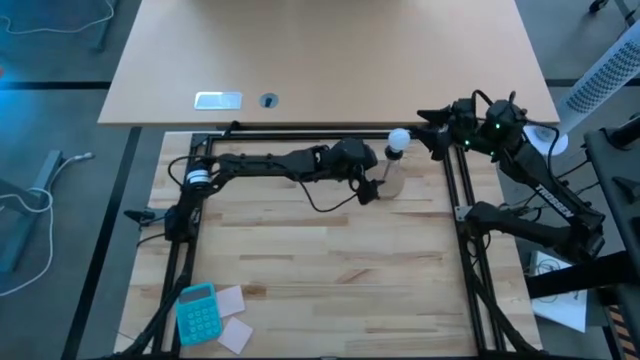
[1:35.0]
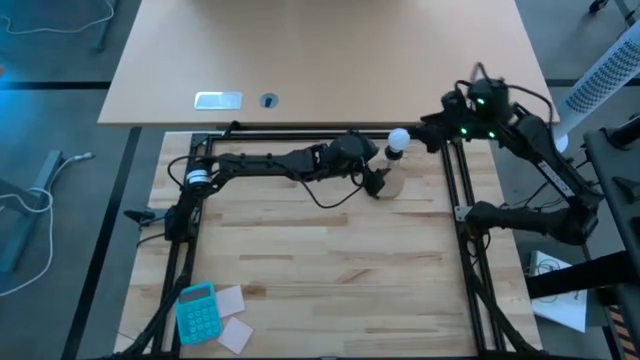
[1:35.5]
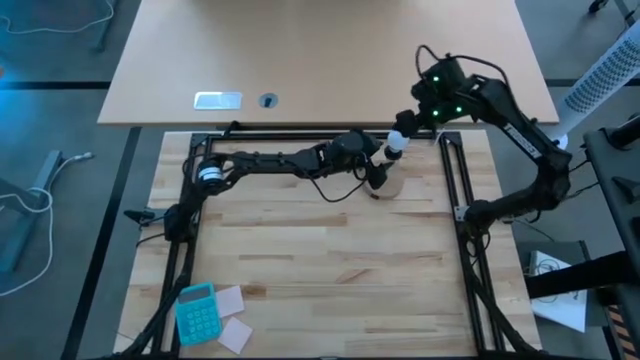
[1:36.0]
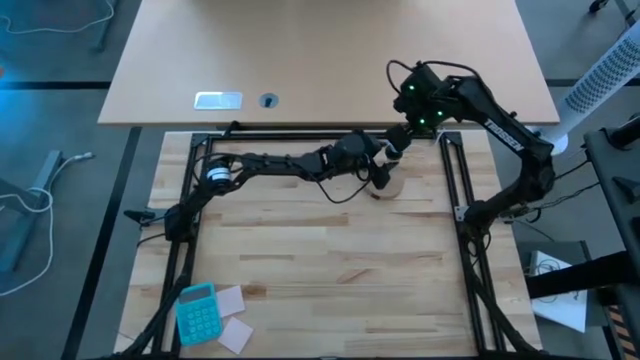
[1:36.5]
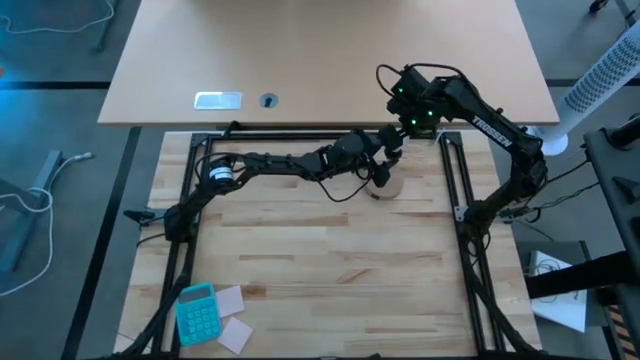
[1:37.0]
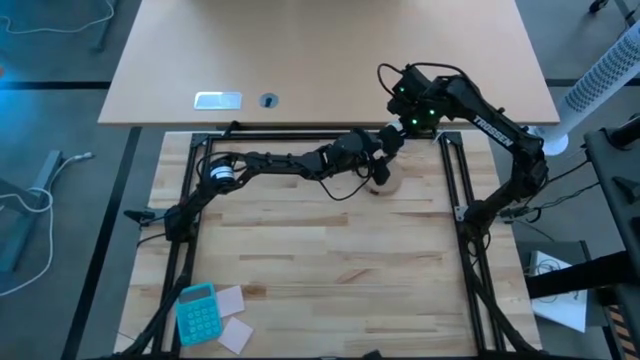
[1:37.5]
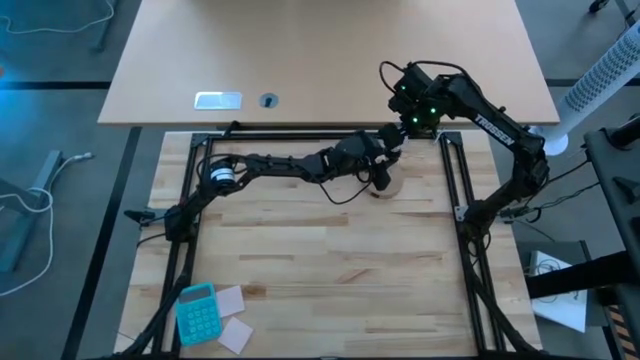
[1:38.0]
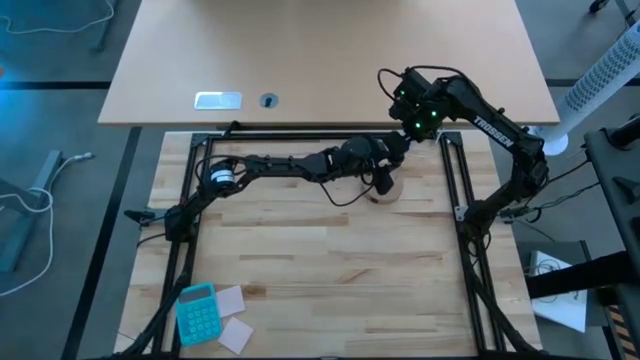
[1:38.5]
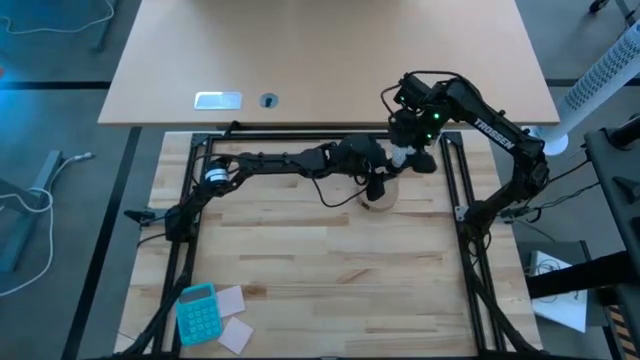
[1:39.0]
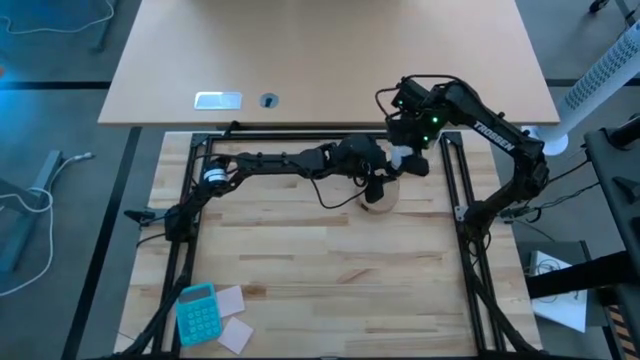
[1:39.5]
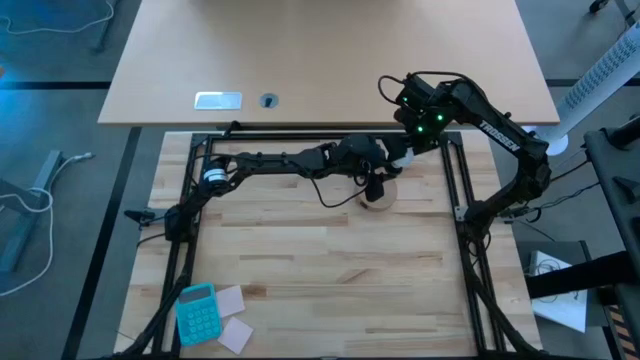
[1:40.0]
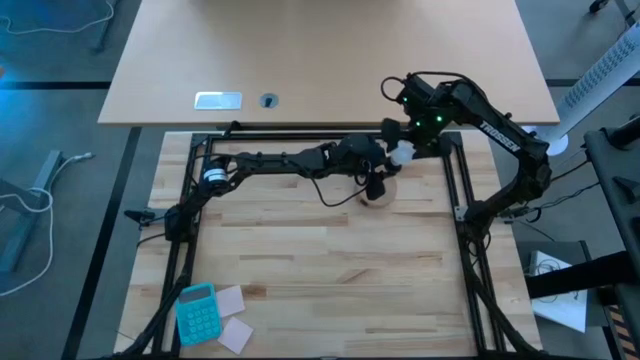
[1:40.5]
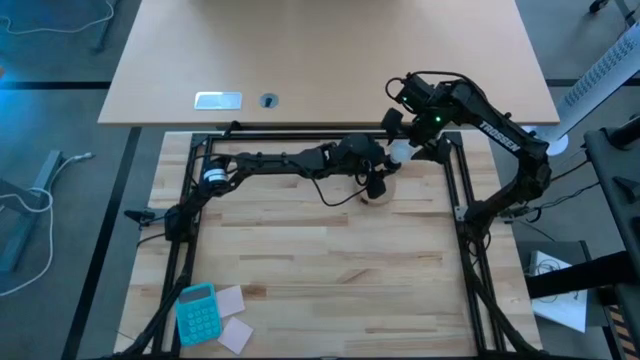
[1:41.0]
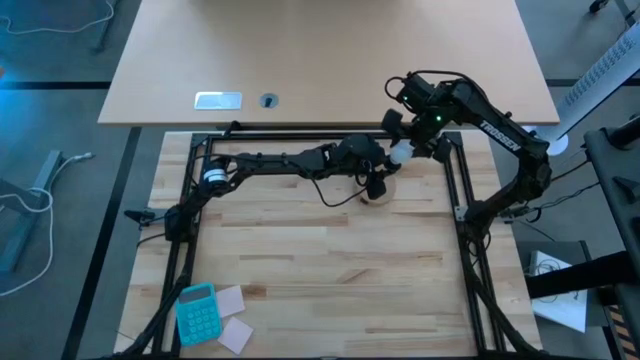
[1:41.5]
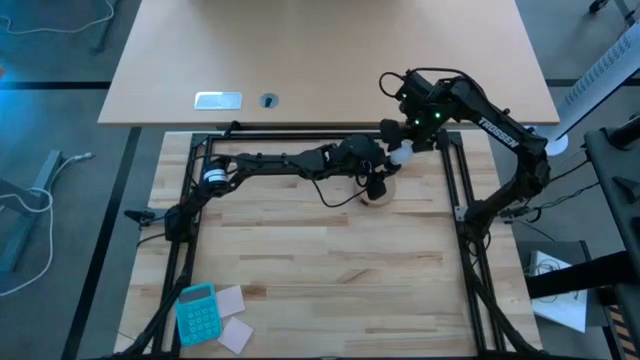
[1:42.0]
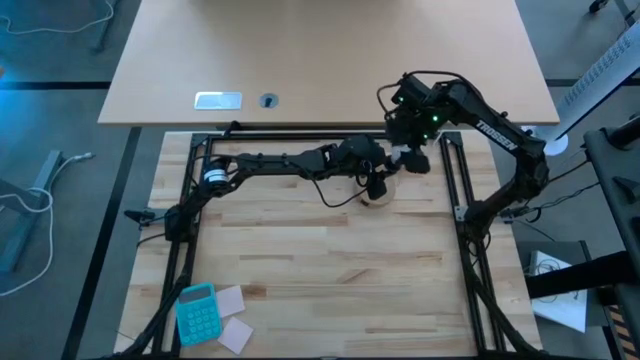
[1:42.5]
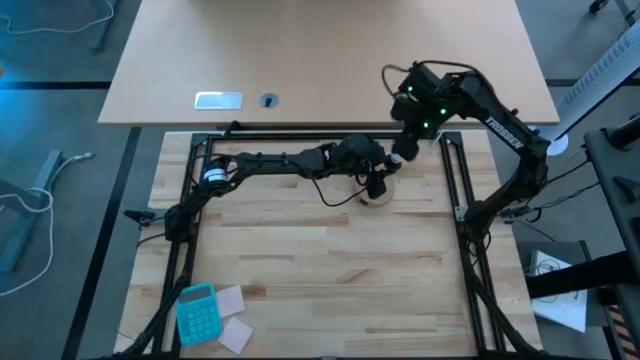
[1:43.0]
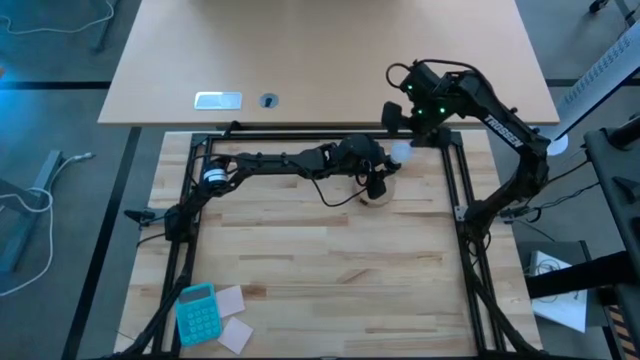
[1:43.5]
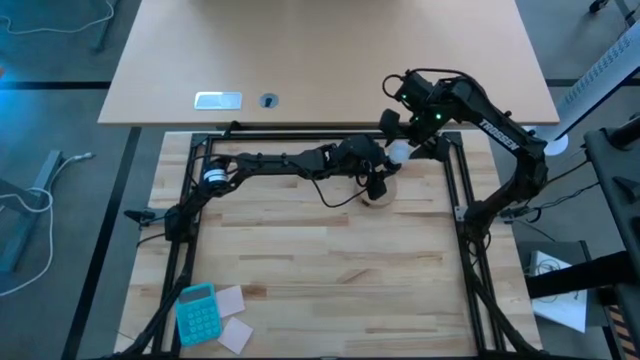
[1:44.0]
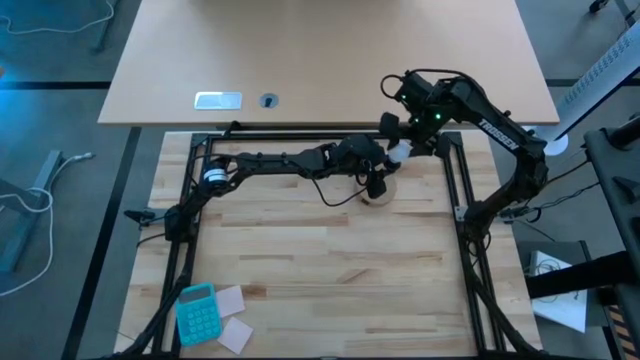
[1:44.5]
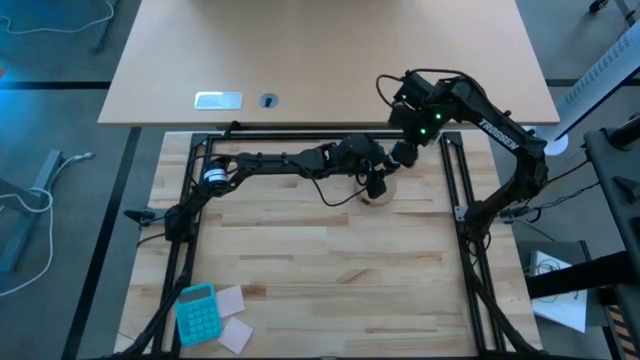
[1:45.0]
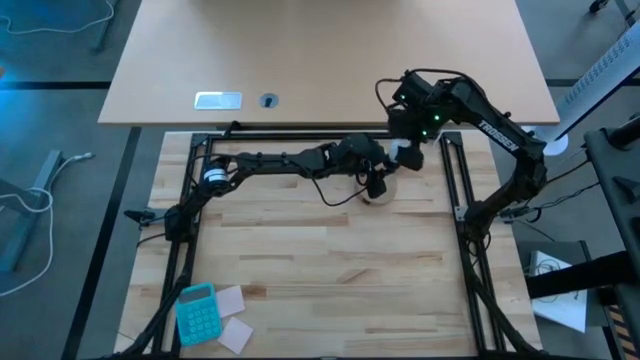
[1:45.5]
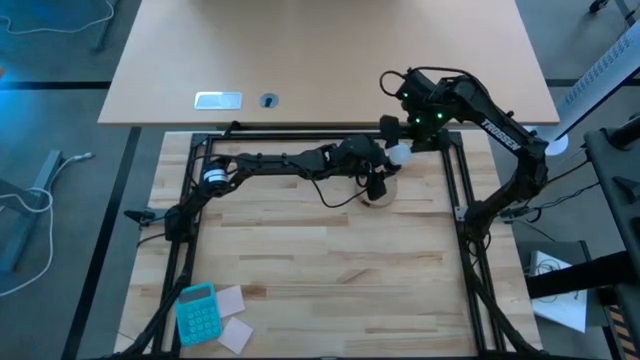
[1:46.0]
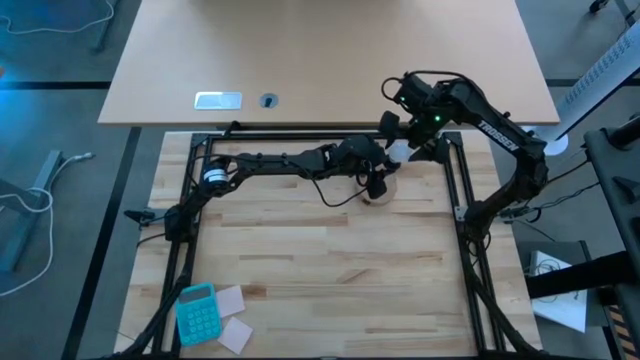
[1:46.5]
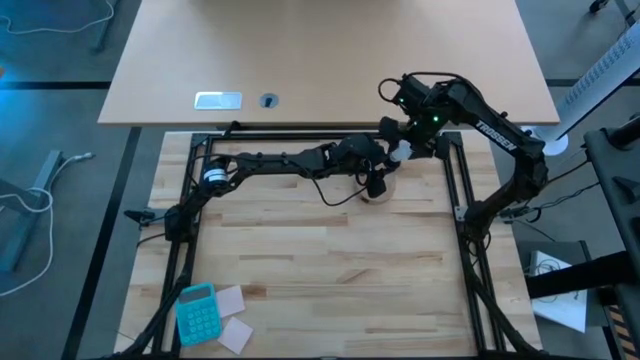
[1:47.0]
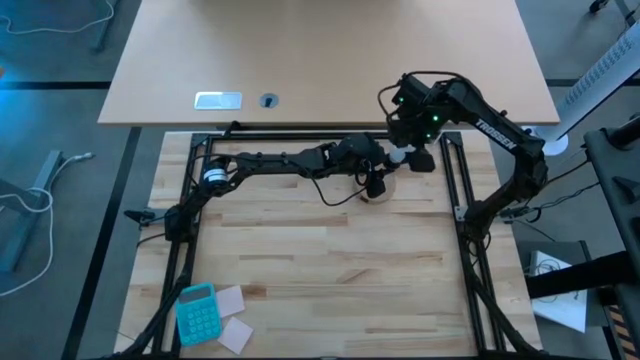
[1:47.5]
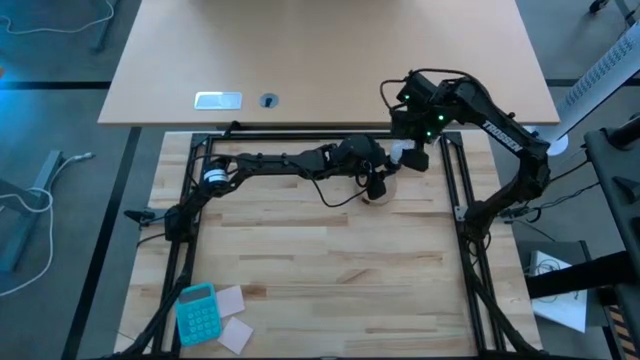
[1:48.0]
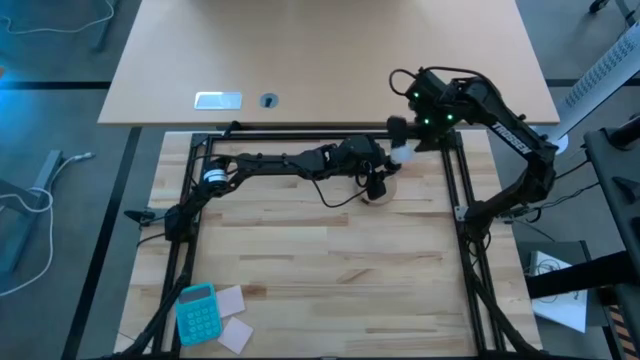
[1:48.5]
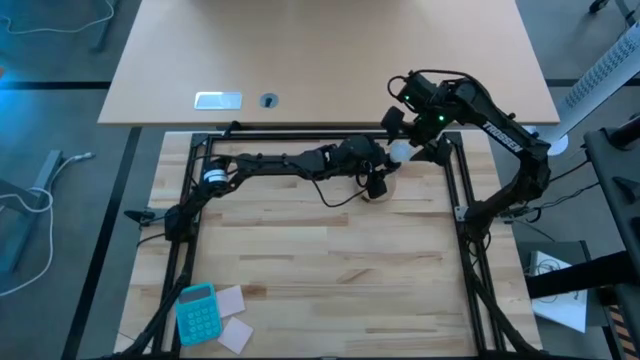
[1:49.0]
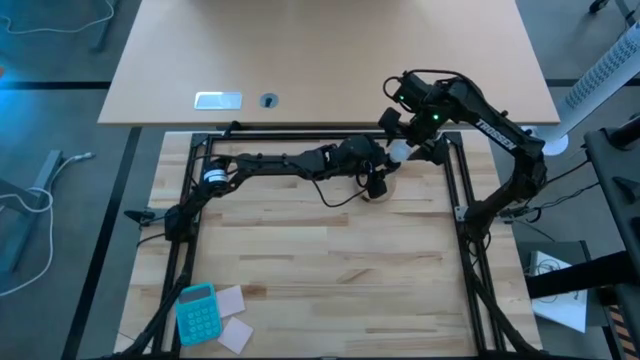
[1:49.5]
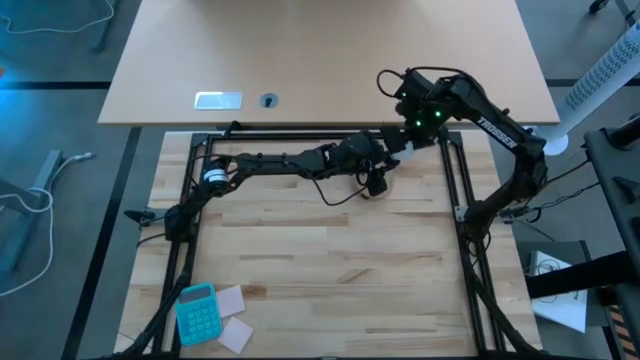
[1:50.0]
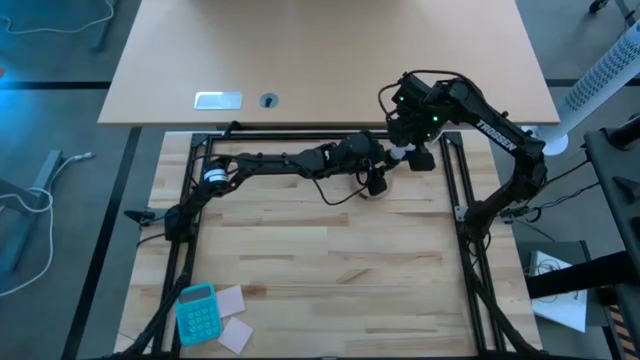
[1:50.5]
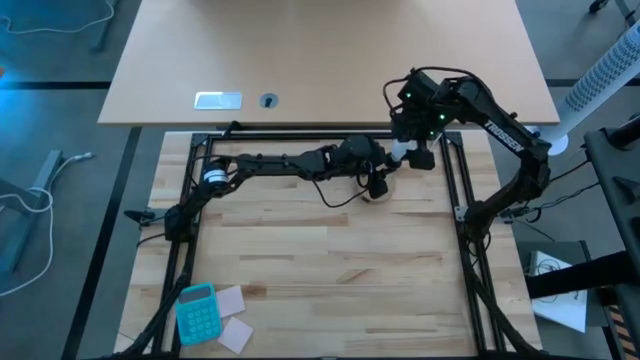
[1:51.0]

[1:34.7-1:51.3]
Task: Screw lightbulb
Remove the lightbulb from the lamp
